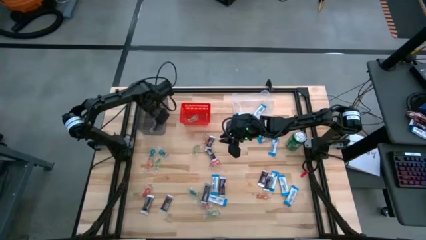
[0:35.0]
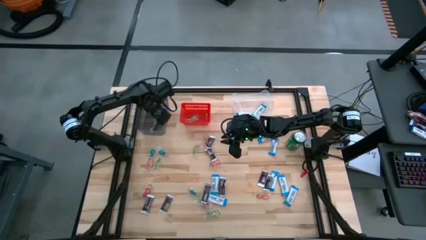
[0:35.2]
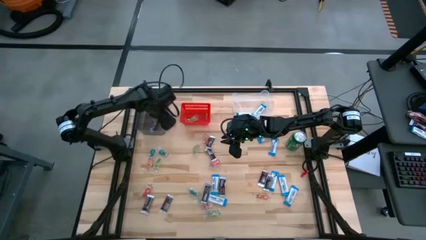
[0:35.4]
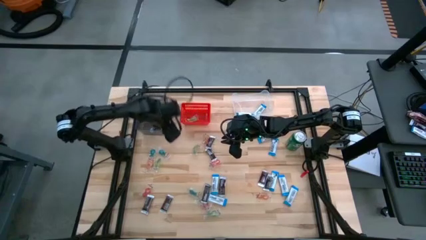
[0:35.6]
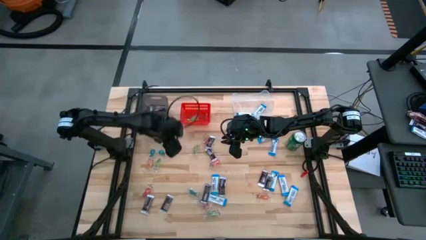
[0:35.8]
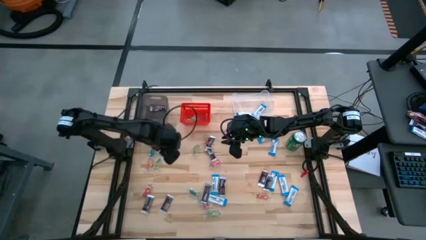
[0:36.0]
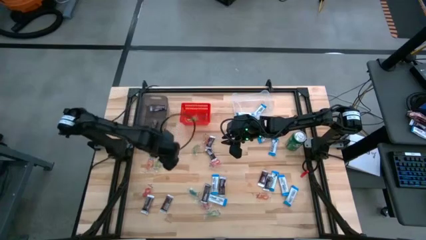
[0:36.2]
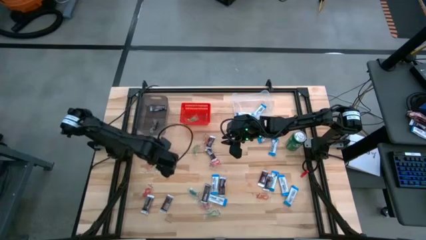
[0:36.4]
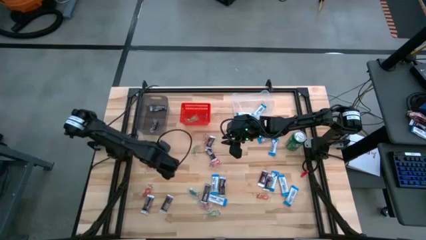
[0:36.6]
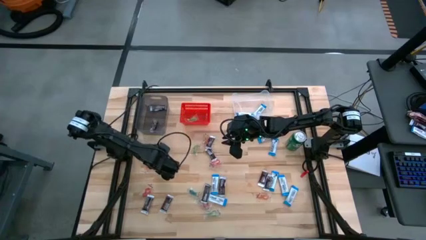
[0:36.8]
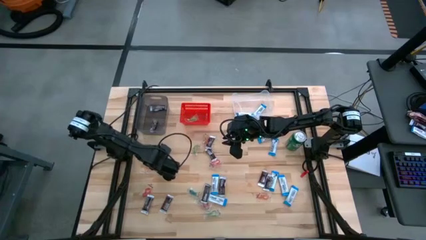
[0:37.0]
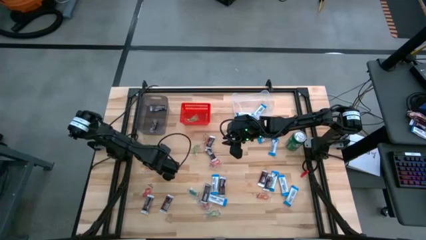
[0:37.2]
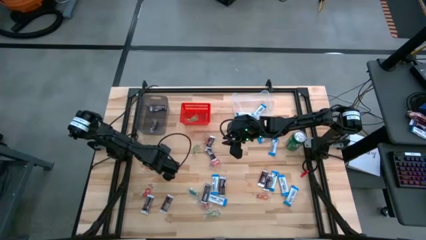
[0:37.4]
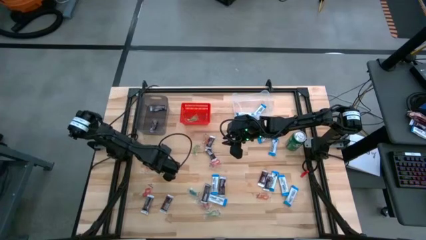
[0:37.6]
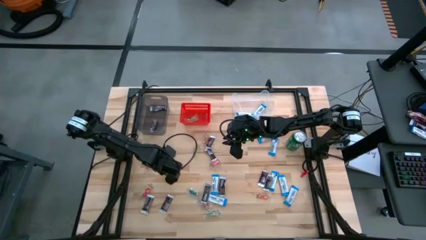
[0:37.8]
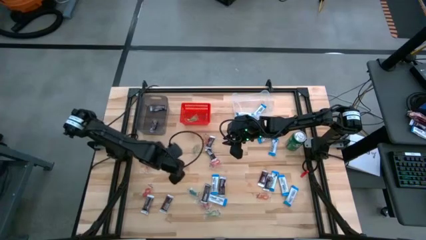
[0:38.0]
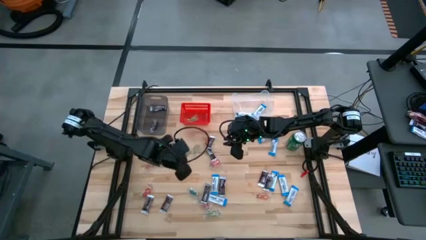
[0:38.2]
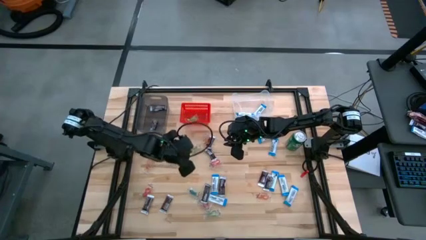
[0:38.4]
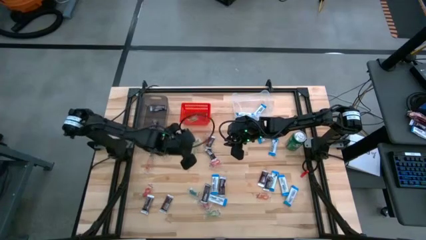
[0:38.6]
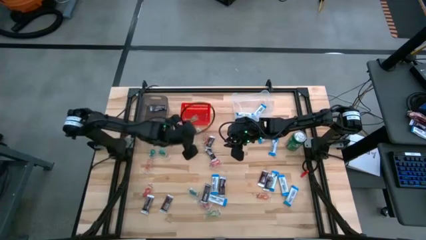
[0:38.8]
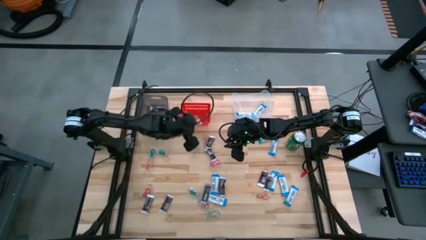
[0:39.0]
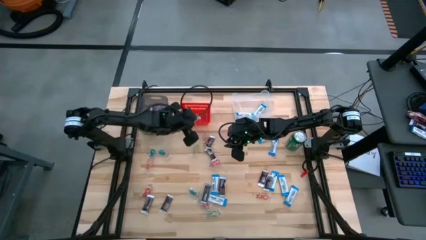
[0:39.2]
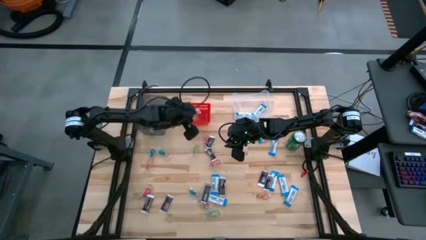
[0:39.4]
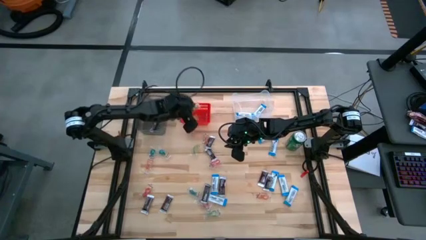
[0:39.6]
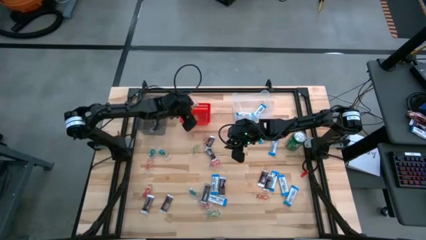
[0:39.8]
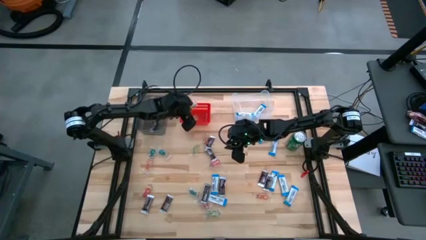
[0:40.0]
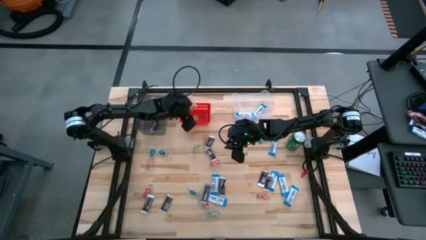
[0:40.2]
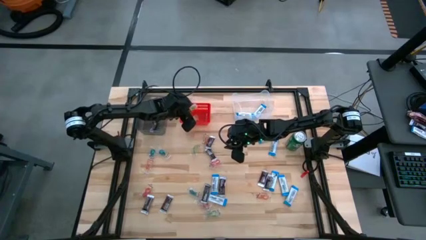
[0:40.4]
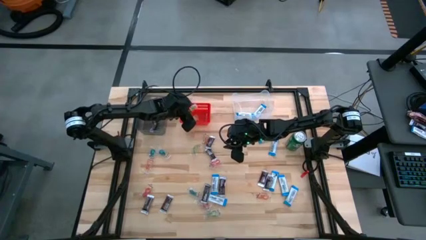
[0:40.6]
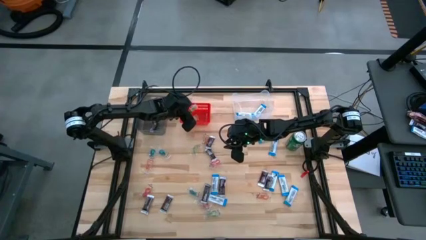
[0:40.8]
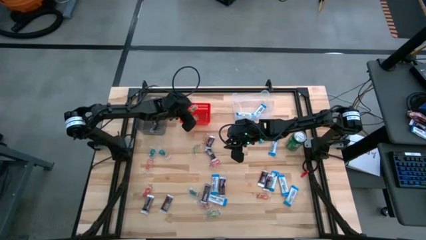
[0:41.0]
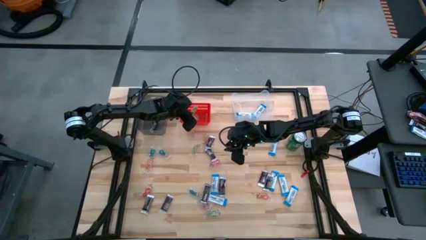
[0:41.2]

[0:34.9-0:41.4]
Task: Sort candy
Put the green gummy into the red bin

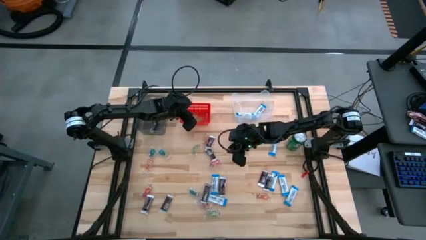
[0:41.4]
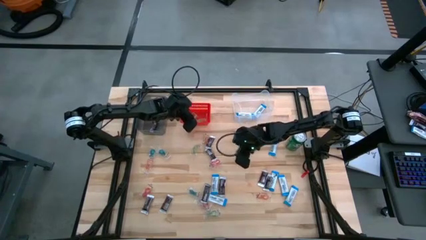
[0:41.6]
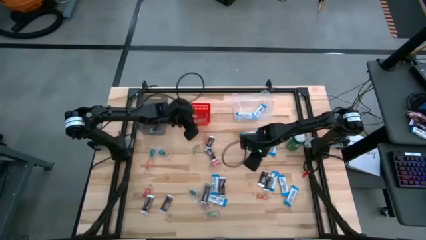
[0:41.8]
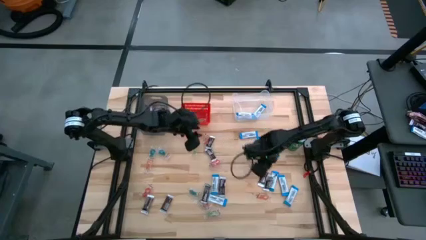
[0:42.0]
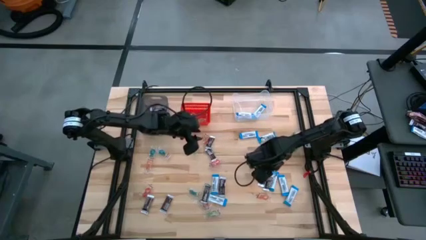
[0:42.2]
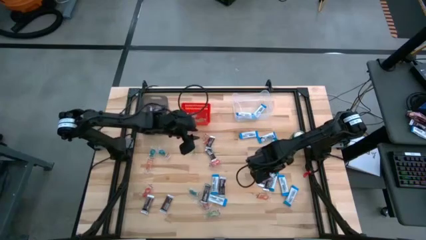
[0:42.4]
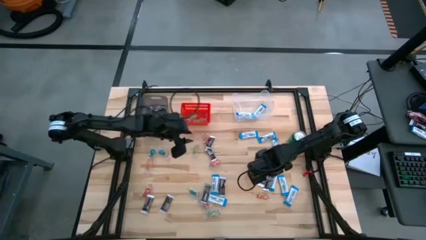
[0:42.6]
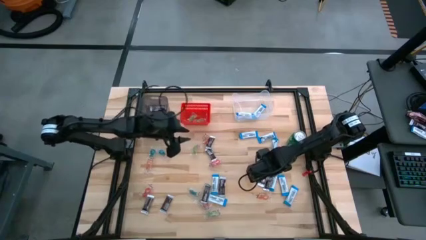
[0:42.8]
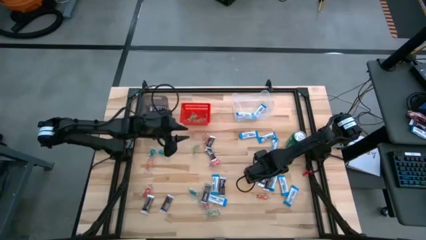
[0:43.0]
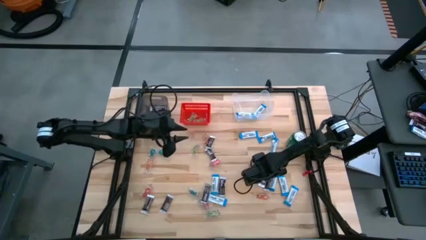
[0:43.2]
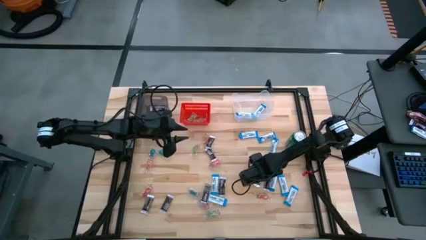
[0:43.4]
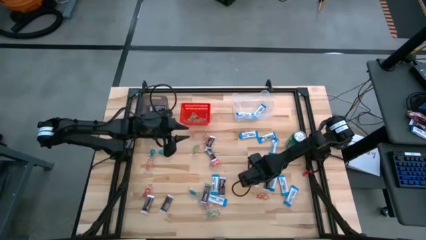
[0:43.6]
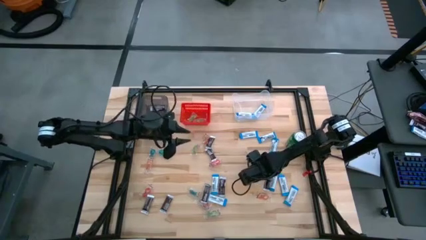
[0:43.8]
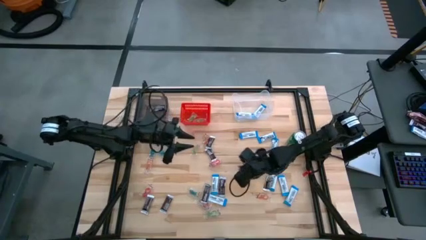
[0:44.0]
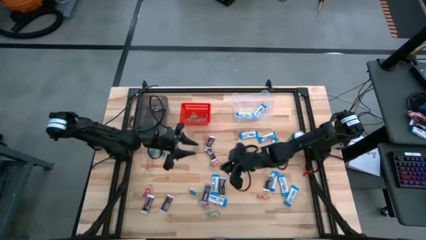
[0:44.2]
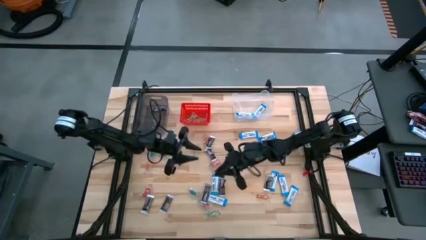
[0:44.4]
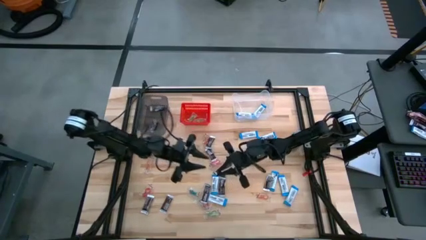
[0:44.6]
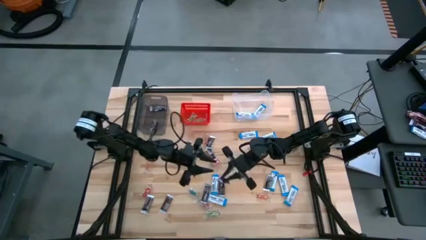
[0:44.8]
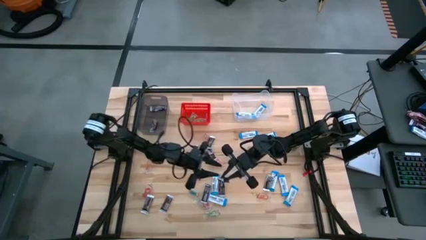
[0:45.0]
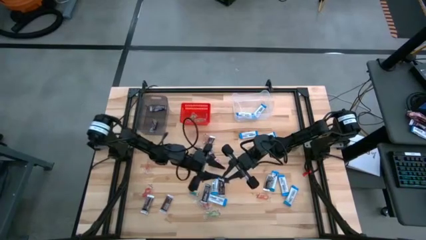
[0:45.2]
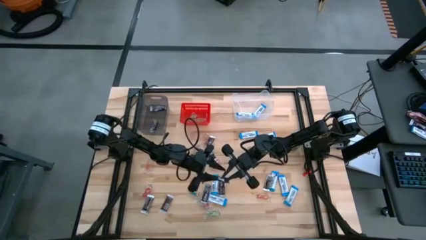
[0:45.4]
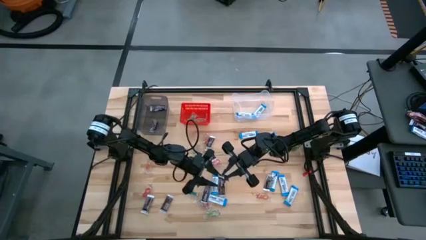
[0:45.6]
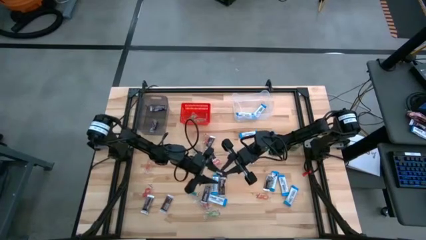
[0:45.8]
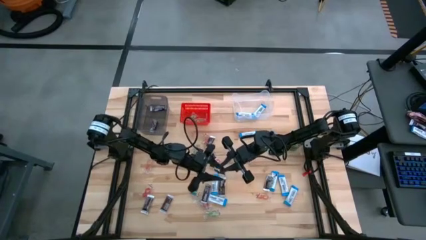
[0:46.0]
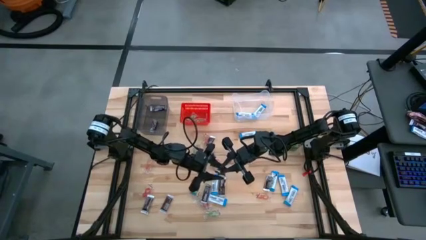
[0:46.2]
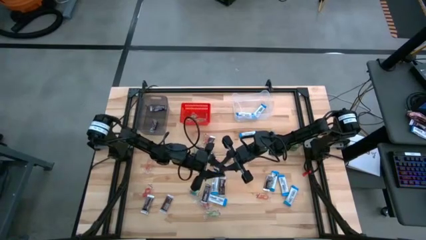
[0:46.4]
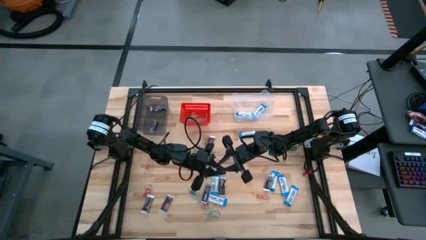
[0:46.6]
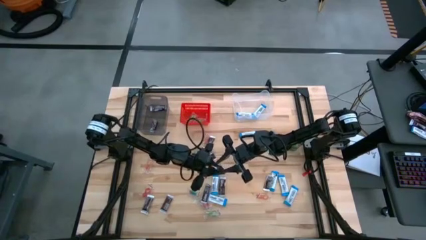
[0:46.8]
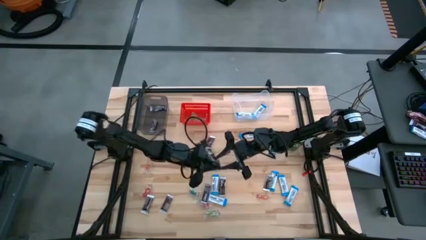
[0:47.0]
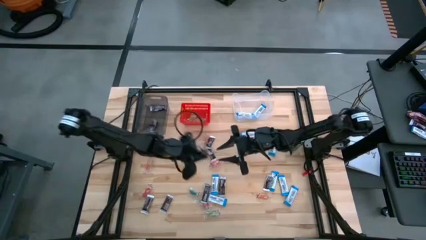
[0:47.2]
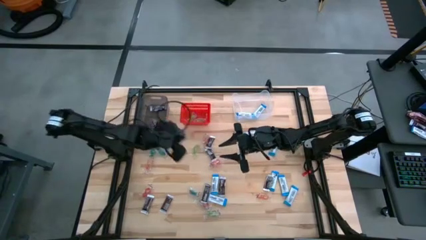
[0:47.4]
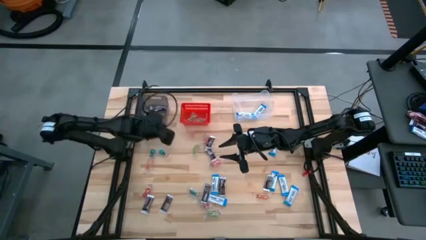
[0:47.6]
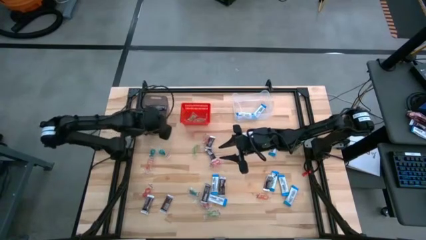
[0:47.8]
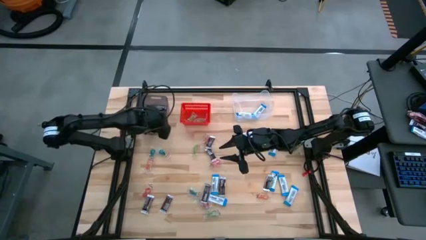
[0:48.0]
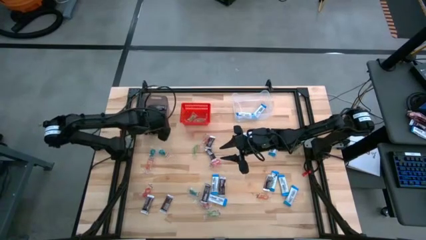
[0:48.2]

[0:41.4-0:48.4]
Put the brown chocolate into the black bin

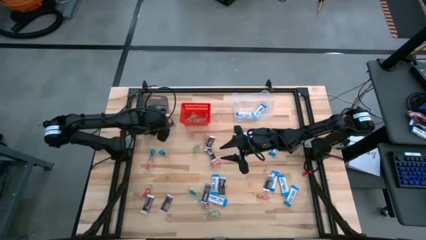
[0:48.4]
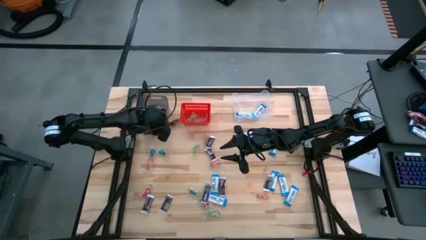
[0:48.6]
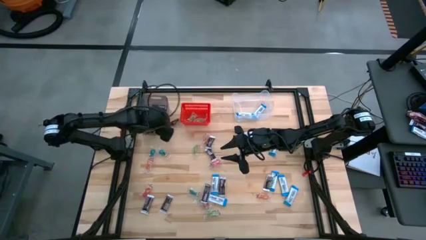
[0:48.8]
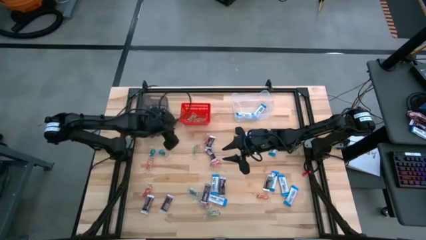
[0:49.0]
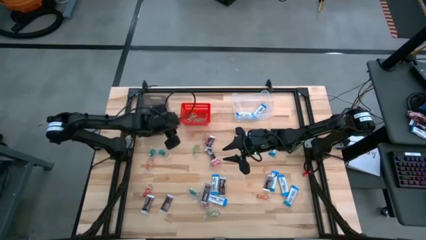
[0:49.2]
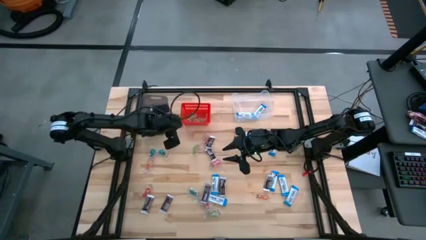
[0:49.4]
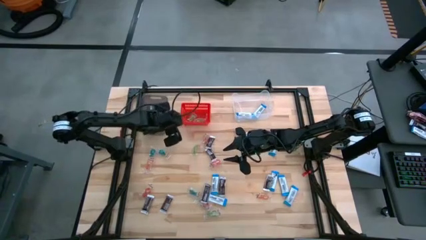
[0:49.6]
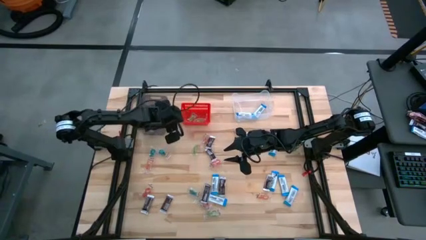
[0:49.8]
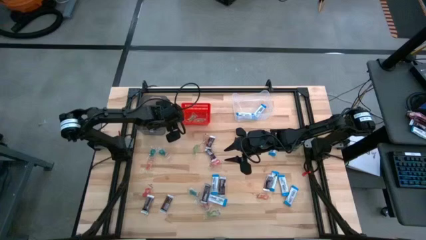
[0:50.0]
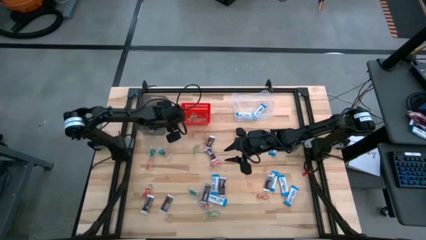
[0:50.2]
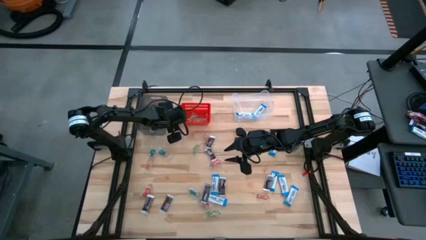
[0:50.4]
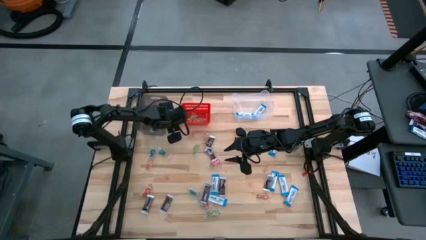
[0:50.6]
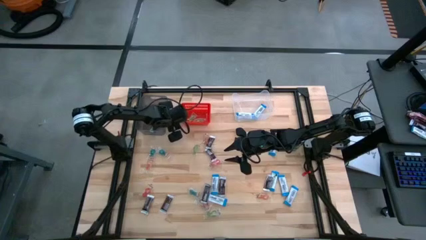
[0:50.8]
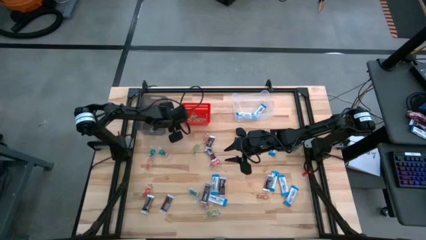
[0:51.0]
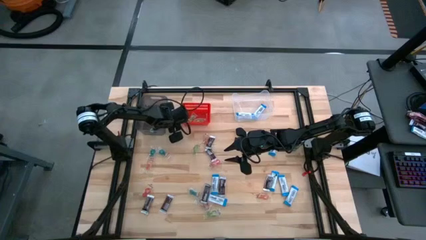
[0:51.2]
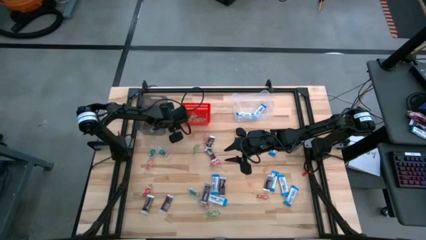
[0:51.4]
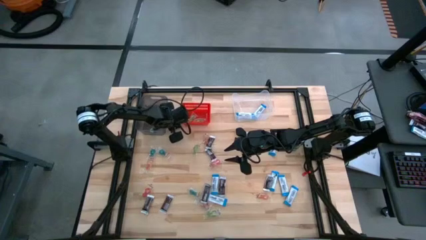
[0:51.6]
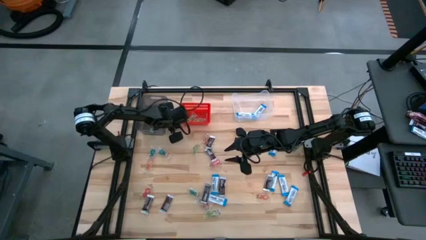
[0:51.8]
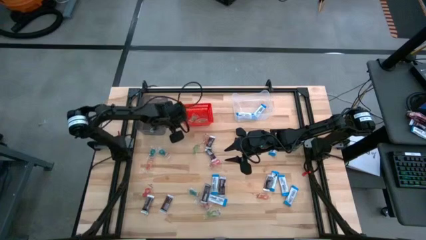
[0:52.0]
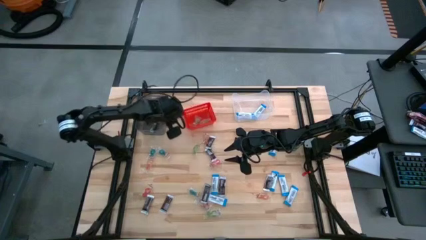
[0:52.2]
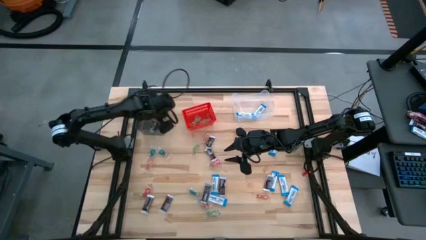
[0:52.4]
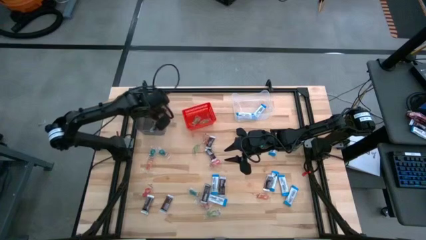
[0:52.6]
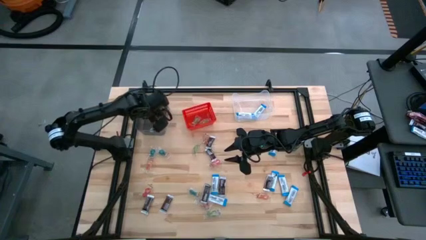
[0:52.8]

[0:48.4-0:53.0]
Put the brown chocolate into the black bin
